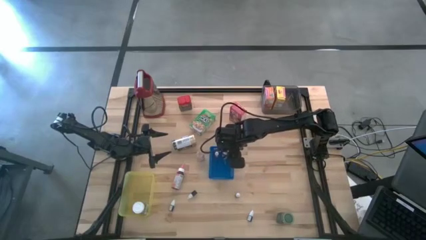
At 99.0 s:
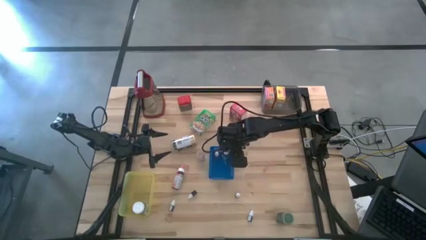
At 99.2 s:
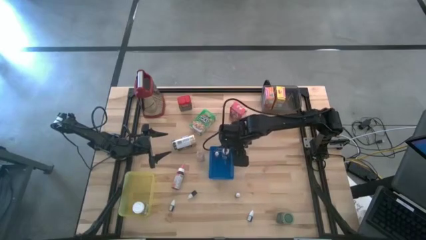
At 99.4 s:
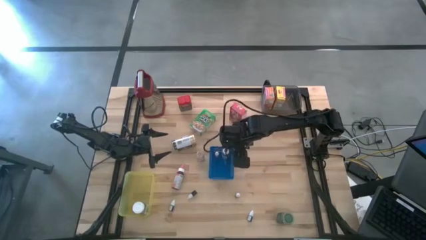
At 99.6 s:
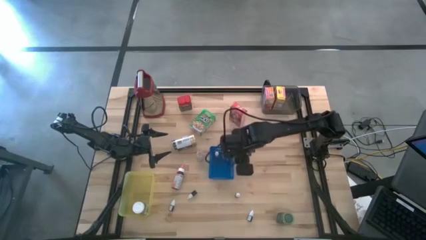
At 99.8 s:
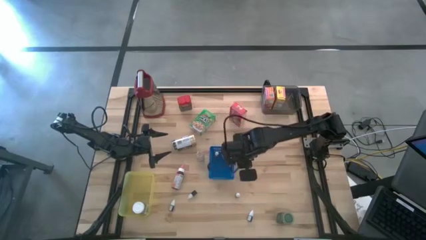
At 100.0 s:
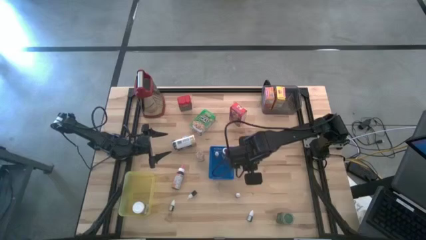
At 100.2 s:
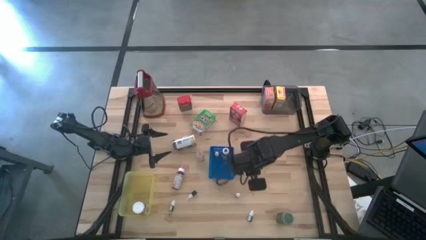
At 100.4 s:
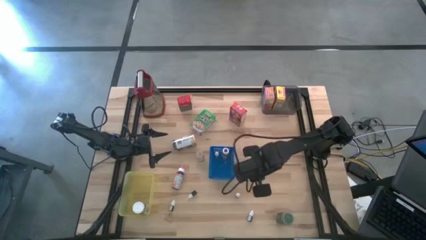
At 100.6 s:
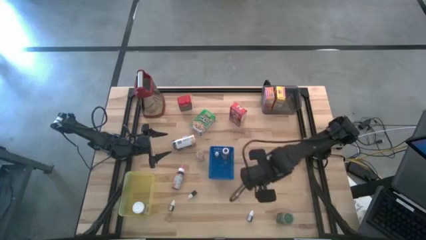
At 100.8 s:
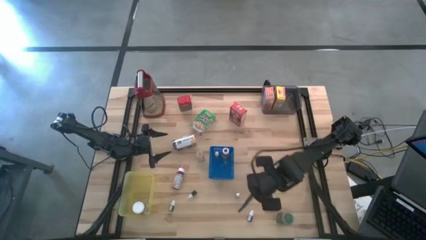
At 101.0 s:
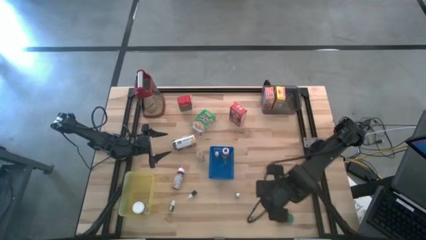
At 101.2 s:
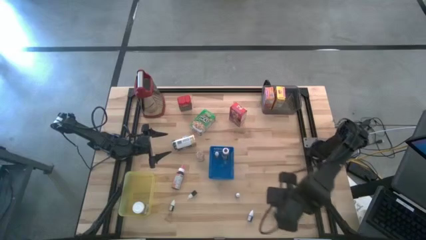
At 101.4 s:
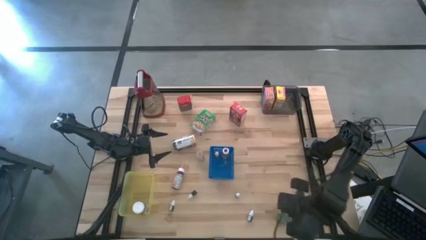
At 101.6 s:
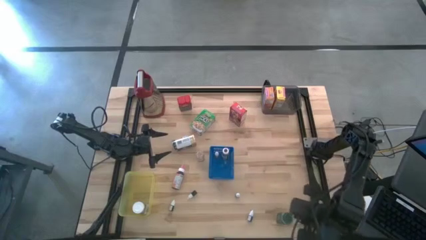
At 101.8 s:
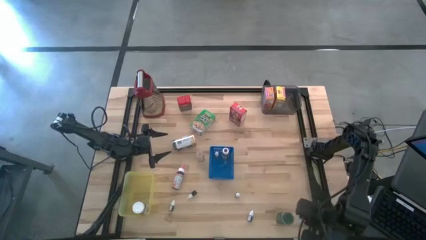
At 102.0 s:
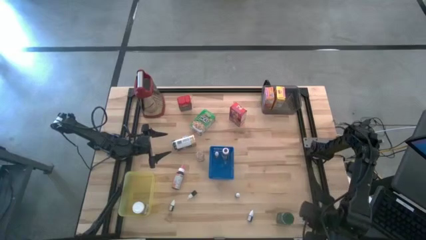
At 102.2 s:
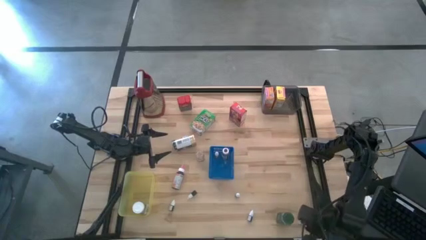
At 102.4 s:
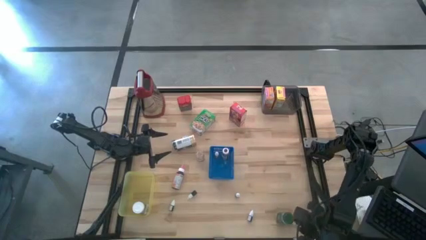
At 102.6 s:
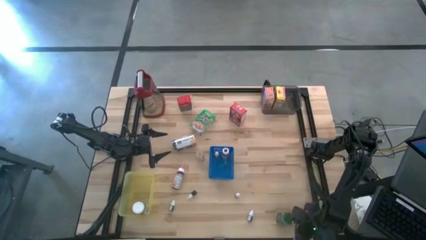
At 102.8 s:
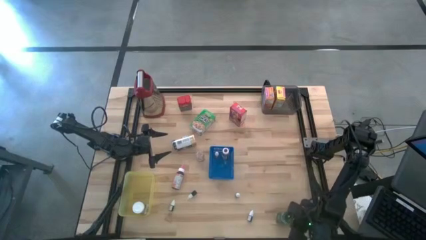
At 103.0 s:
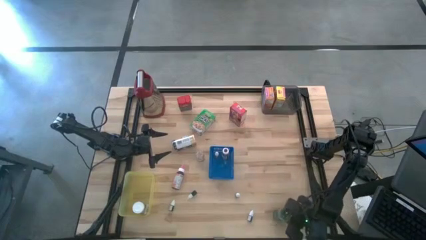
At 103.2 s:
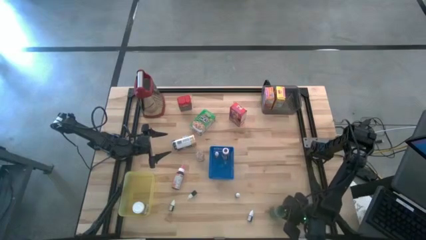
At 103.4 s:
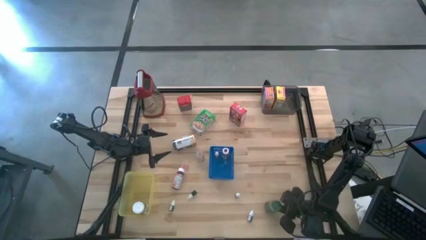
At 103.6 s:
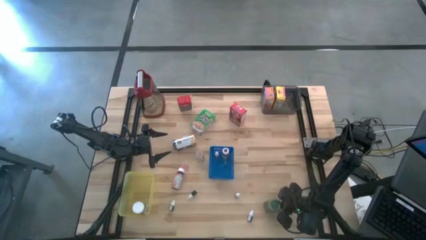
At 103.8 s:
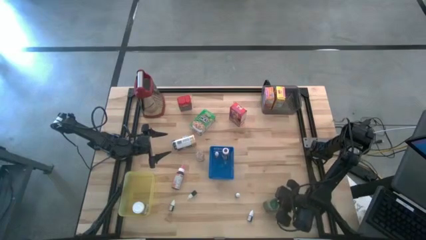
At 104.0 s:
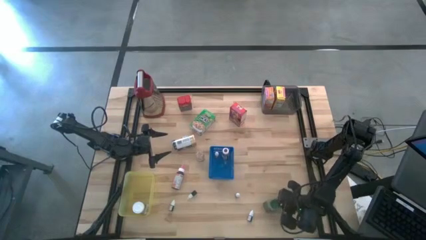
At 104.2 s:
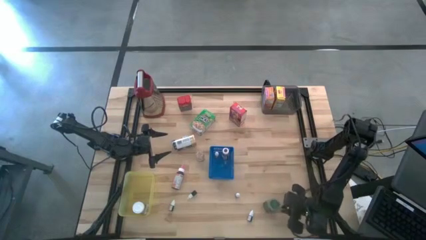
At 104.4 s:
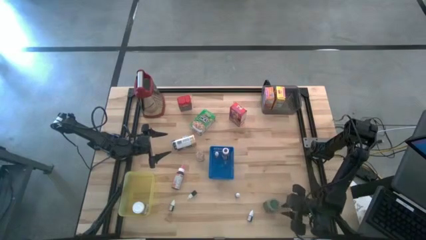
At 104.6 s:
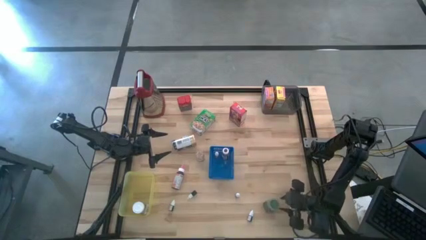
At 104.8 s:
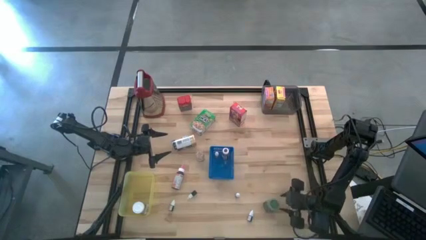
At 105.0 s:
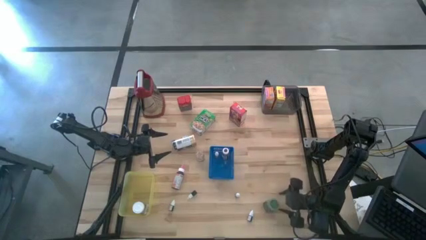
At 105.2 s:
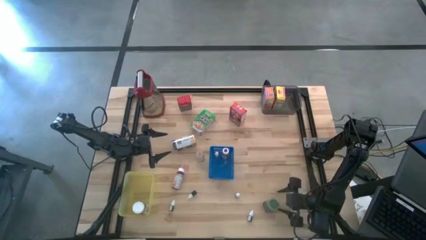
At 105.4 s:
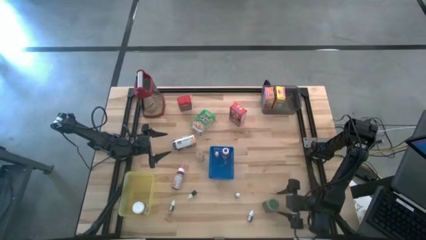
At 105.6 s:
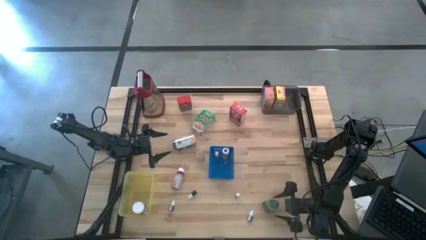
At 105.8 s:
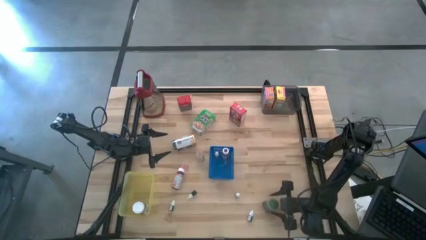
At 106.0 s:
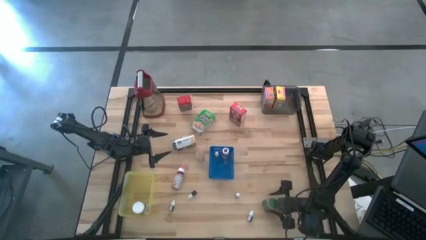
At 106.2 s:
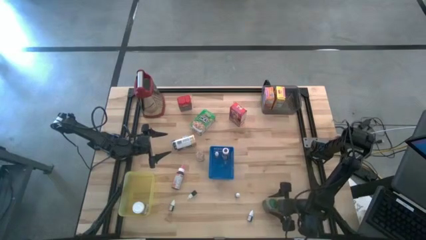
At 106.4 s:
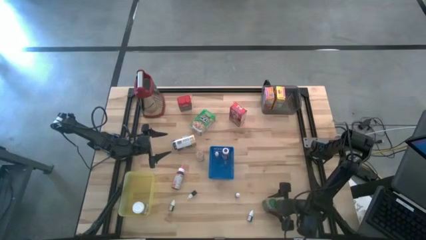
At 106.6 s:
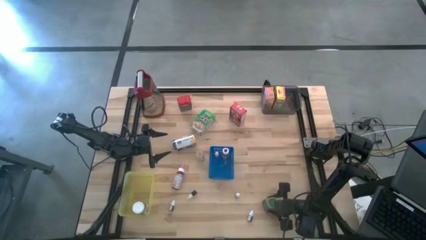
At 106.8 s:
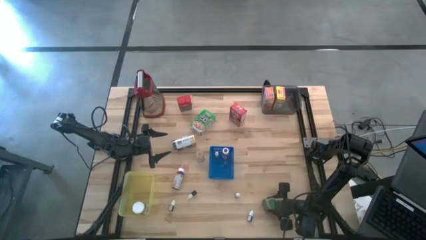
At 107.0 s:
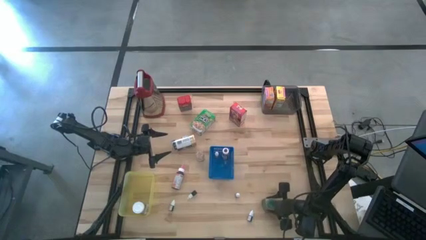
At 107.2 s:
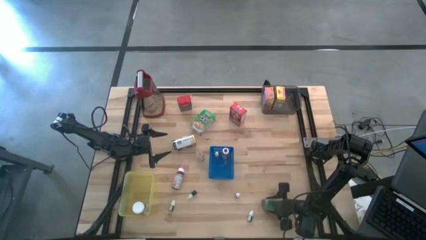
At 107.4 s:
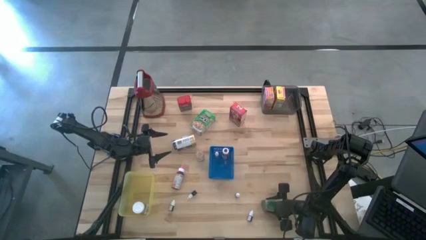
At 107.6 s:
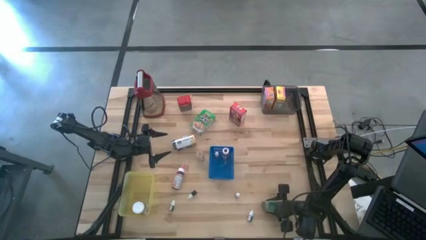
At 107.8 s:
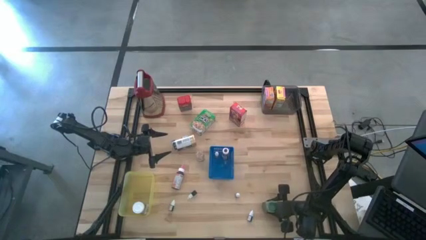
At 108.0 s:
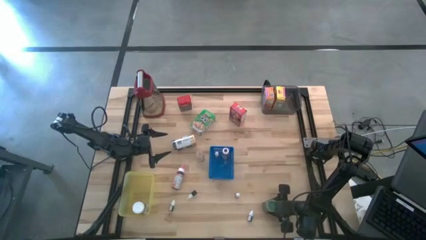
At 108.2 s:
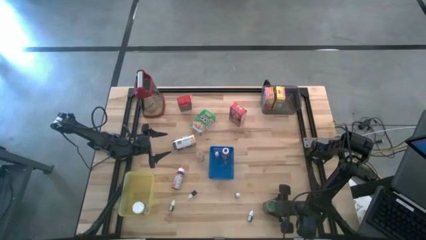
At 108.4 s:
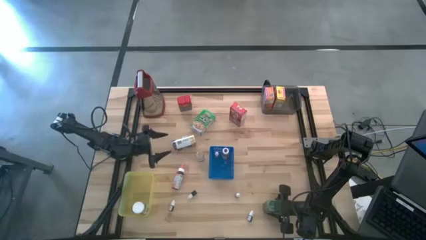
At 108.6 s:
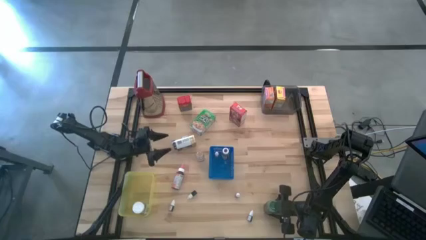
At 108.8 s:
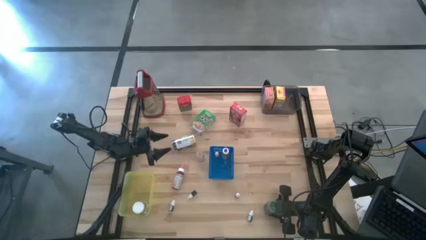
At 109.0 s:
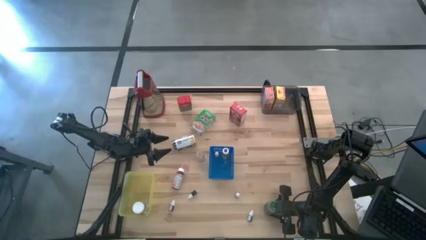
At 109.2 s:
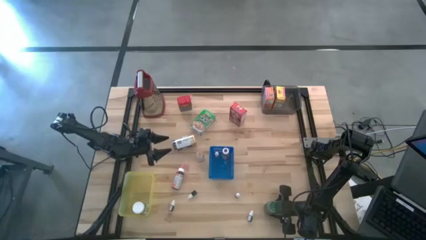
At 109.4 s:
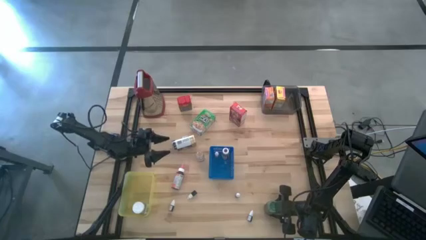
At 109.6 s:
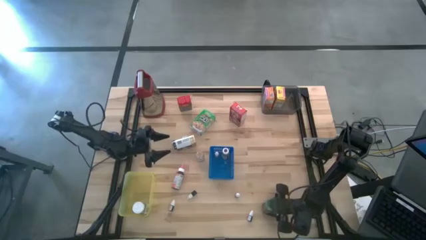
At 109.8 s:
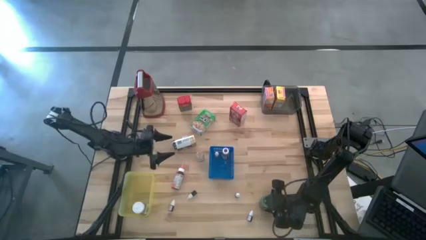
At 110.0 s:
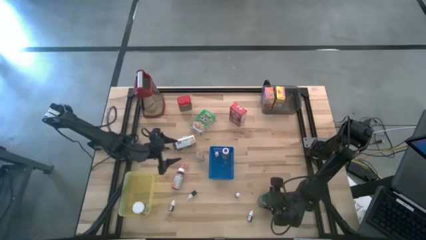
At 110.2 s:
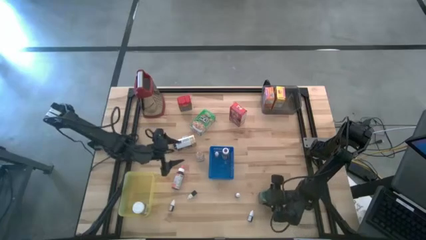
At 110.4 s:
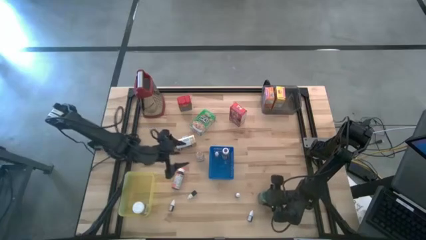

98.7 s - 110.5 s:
Task: Pick & Place Kitchen Items
Put the green seasoning bottle into the yellow bin
